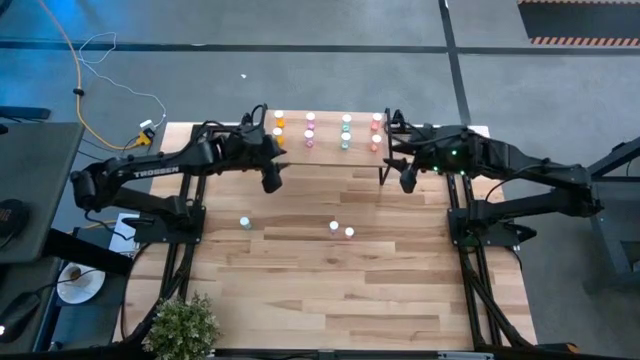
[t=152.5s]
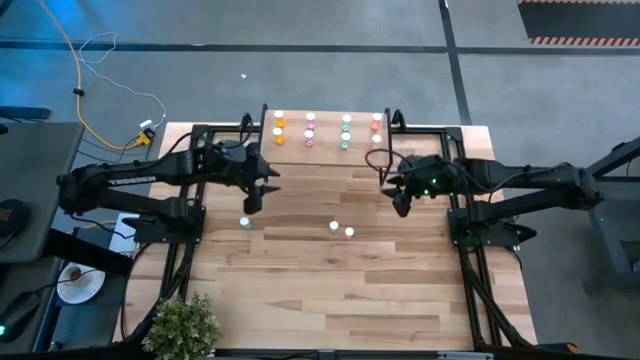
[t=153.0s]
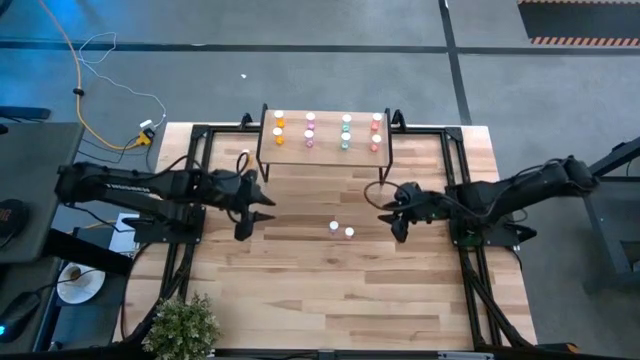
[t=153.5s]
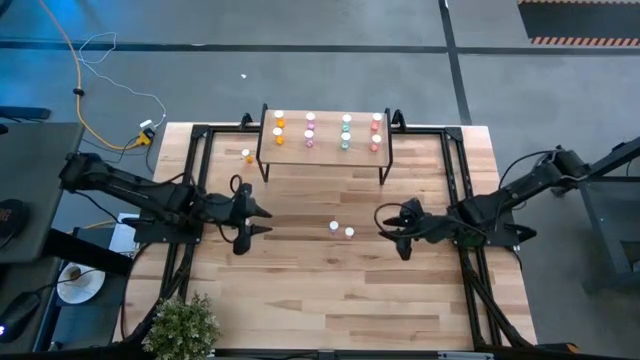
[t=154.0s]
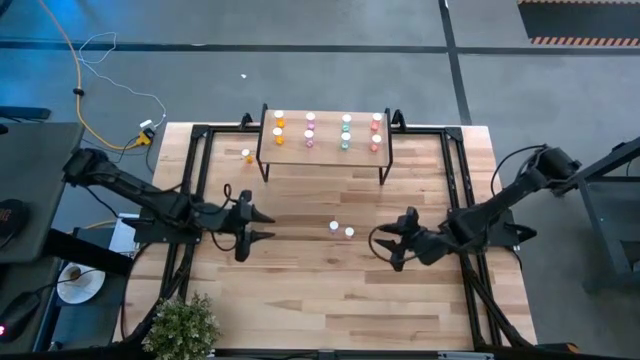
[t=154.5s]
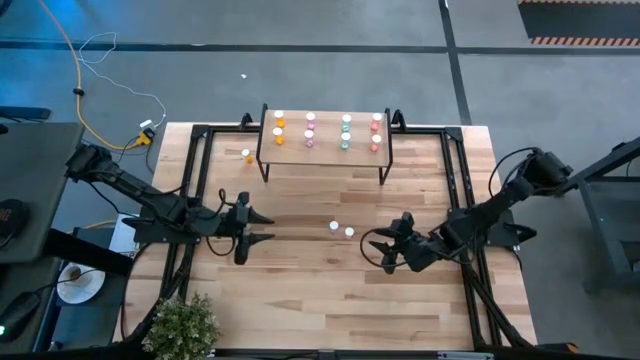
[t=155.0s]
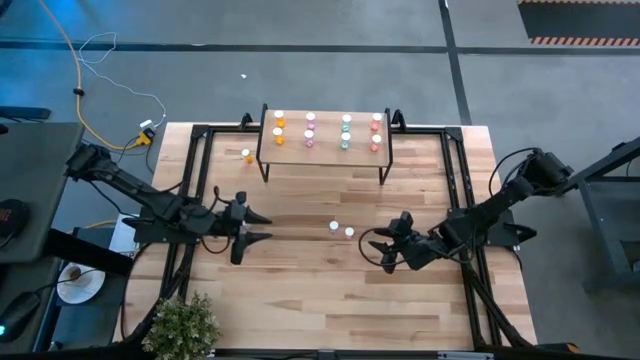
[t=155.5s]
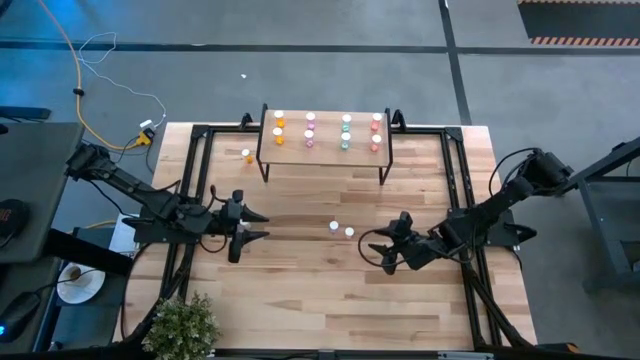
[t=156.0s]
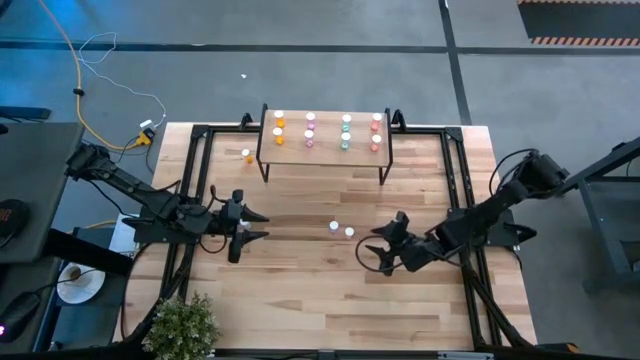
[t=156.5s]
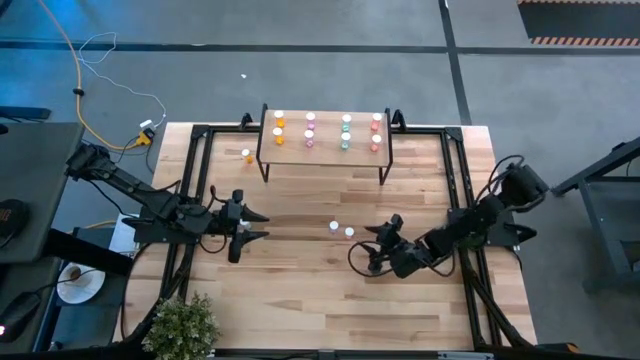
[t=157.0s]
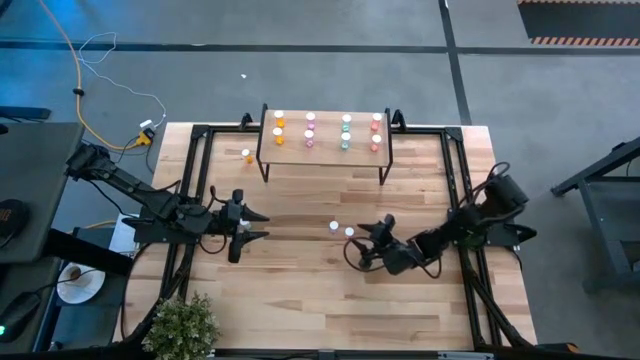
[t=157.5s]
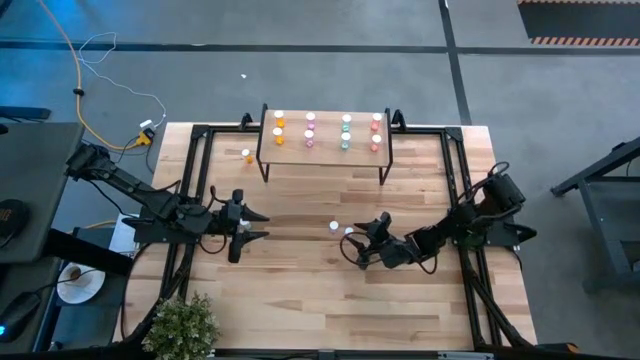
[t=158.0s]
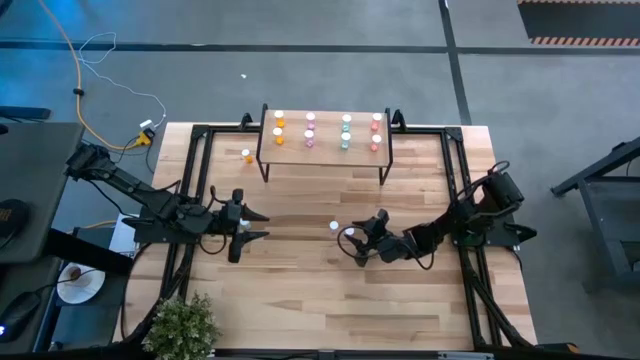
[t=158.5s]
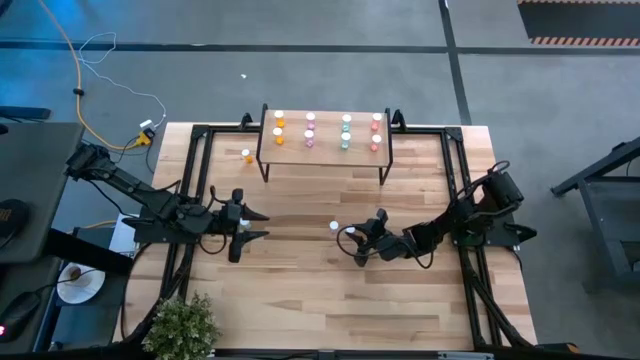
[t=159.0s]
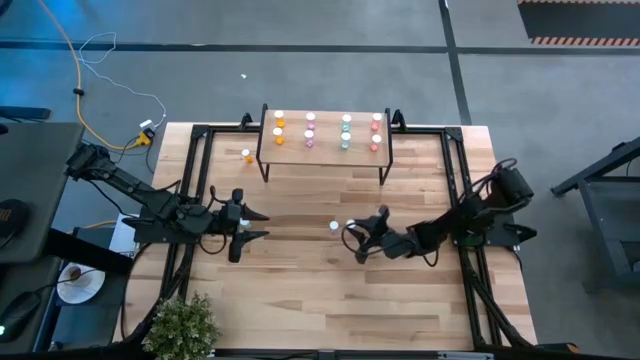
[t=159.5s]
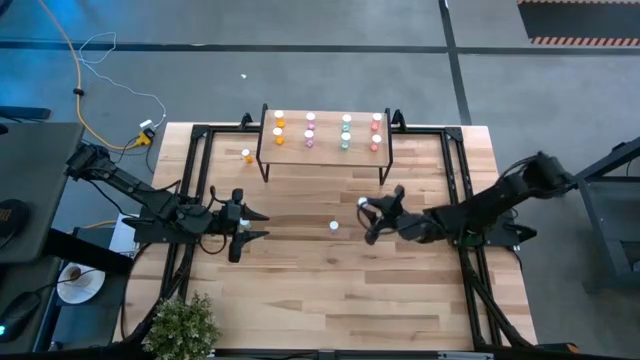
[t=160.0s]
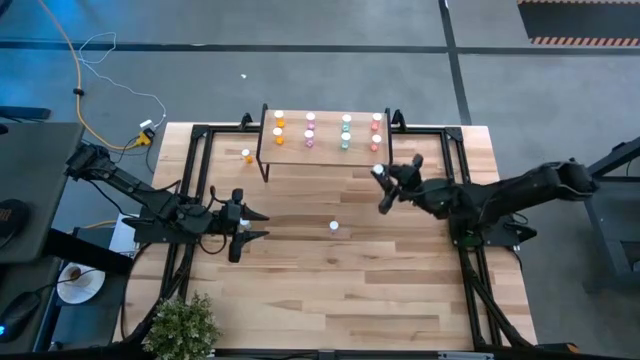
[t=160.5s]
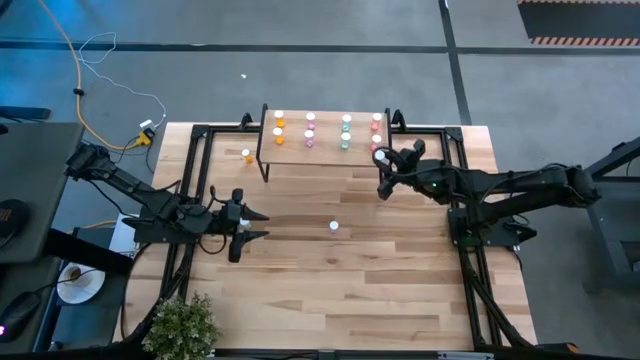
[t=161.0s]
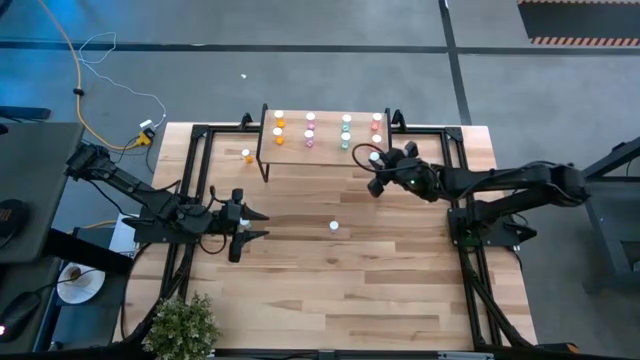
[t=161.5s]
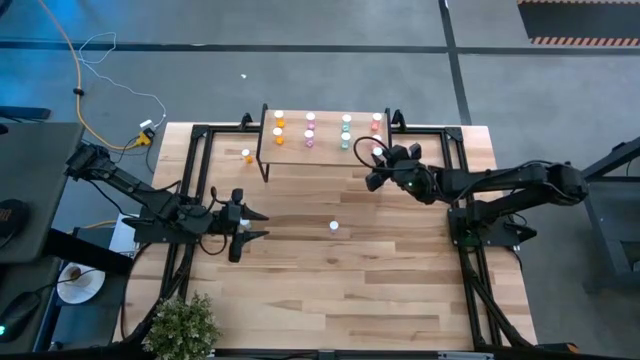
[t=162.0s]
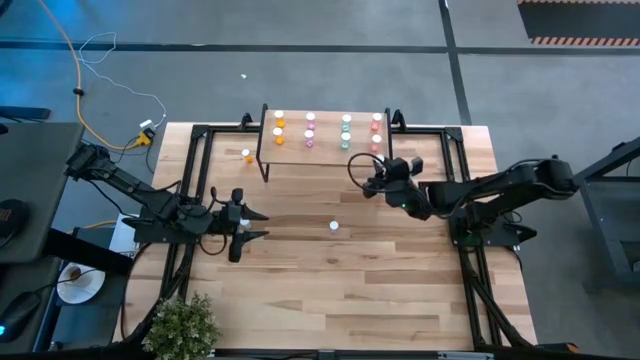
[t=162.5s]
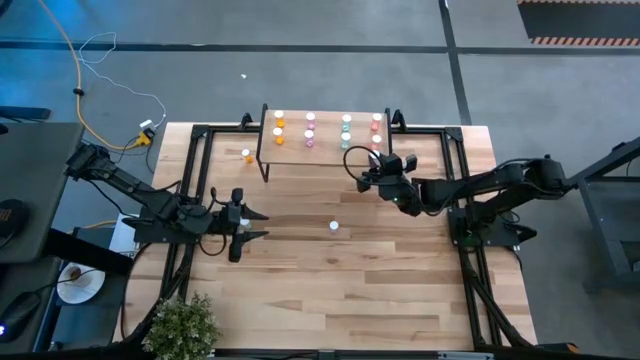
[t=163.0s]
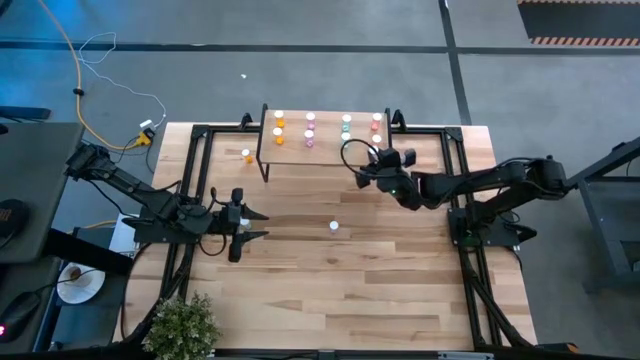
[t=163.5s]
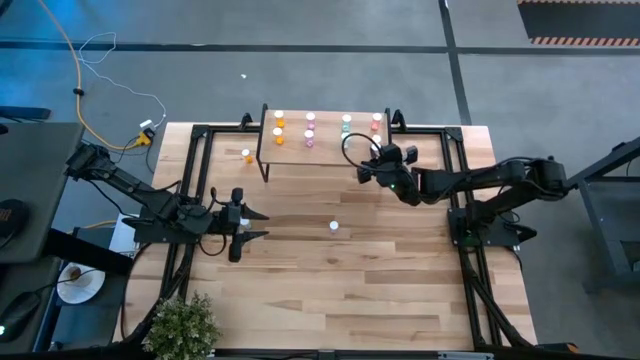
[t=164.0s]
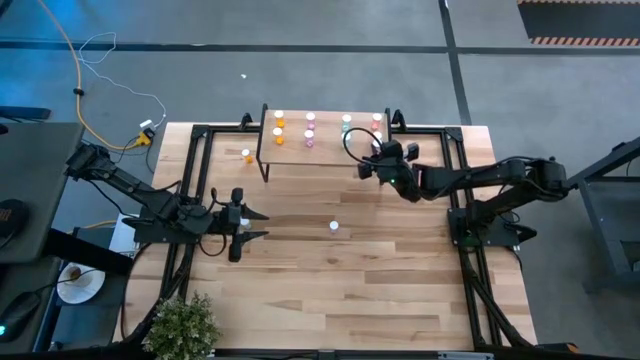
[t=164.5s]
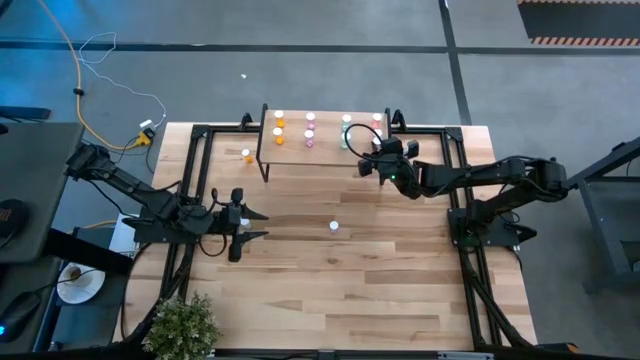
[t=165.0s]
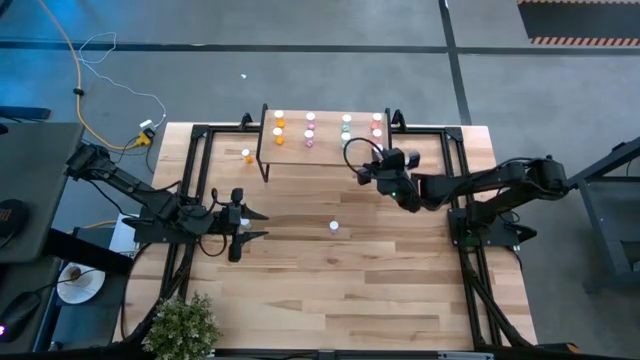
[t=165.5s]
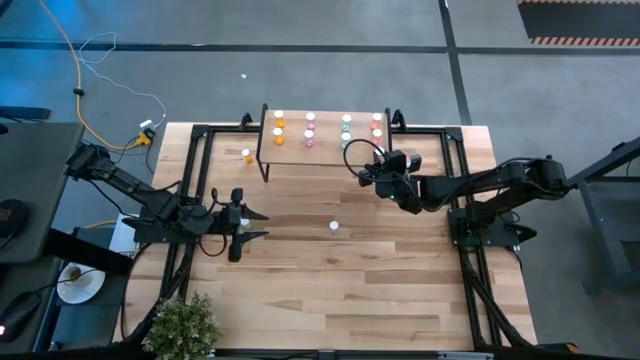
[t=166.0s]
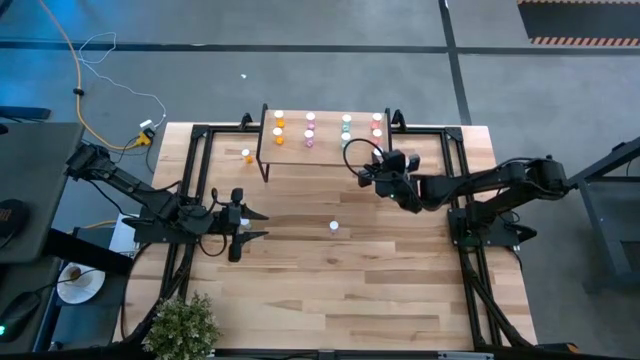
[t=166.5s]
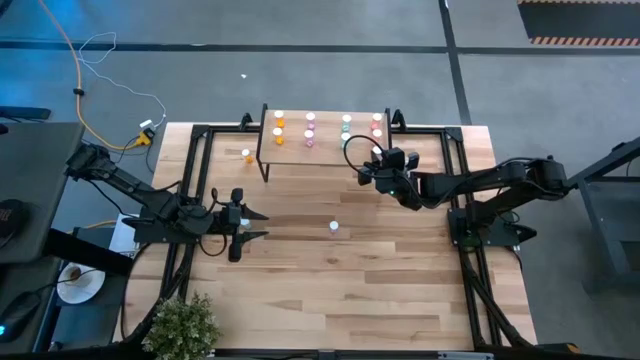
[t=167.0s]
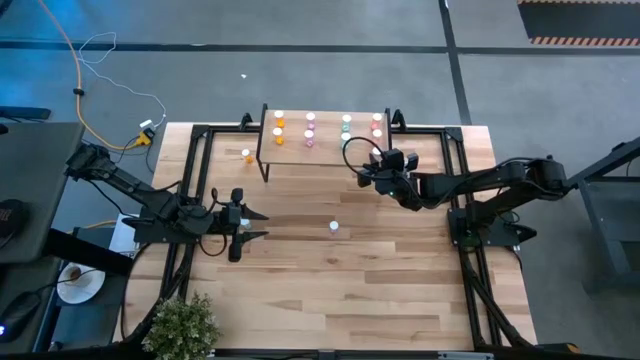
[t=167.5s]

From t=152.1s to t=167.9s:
Task: Pick and place medicine bottles onto shelf by color
Put the red pill bottle on the shelf aligned with the other red pill bottles

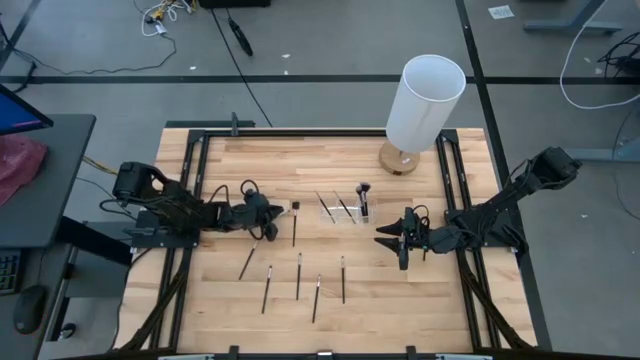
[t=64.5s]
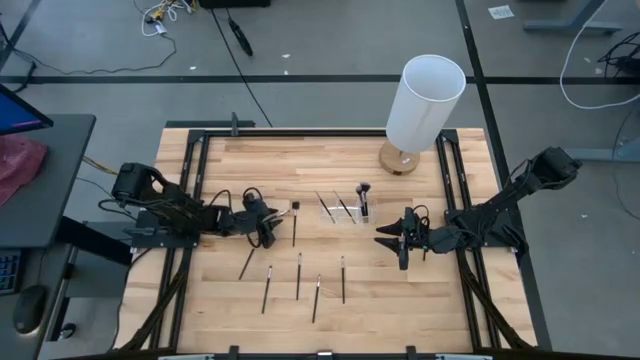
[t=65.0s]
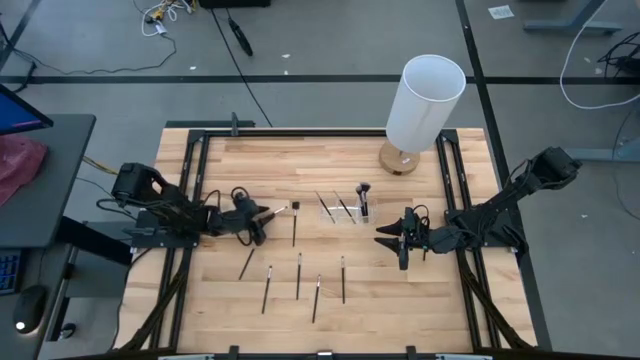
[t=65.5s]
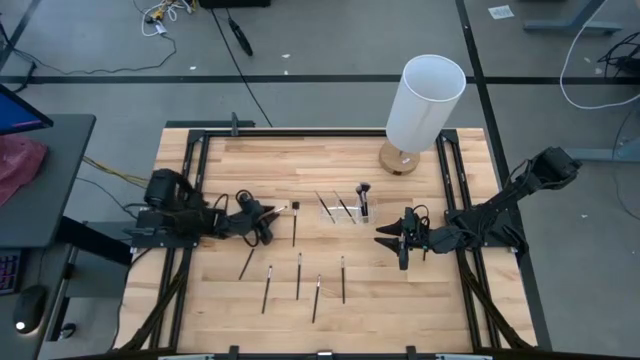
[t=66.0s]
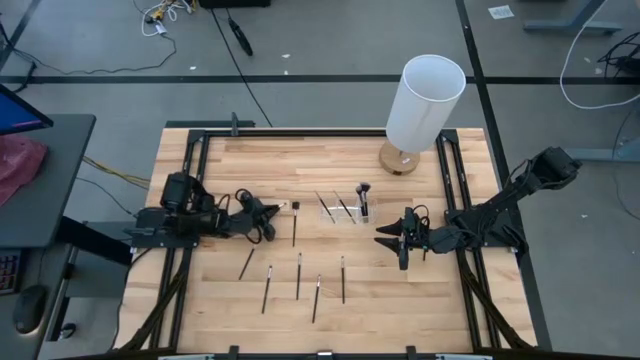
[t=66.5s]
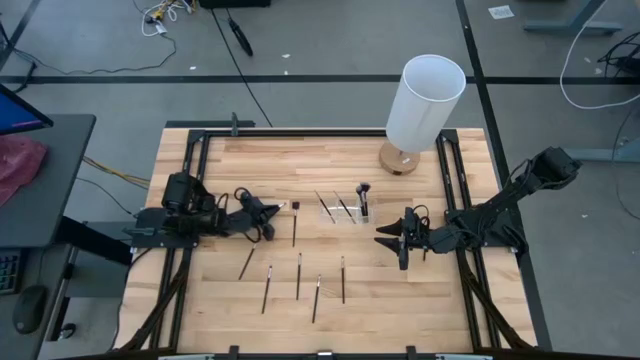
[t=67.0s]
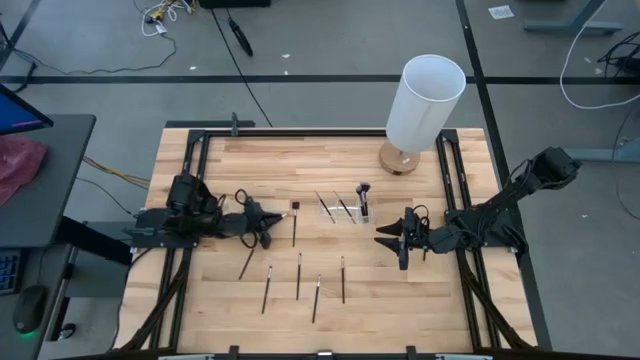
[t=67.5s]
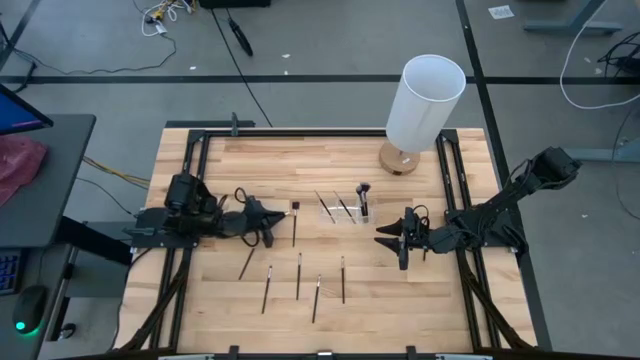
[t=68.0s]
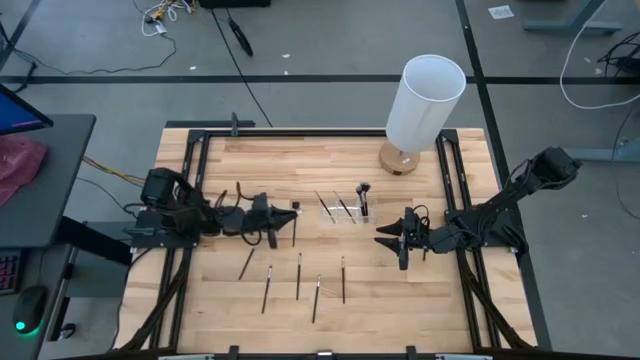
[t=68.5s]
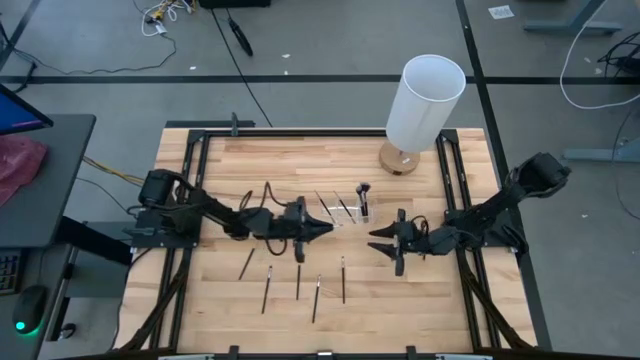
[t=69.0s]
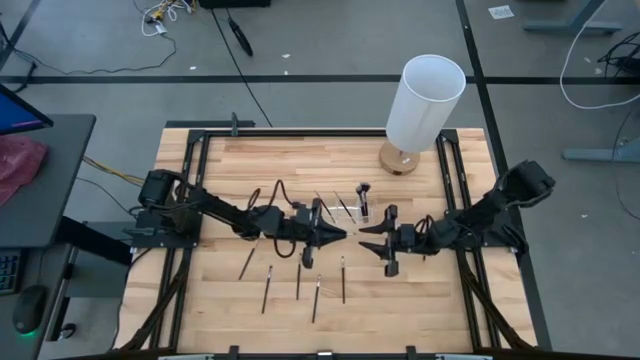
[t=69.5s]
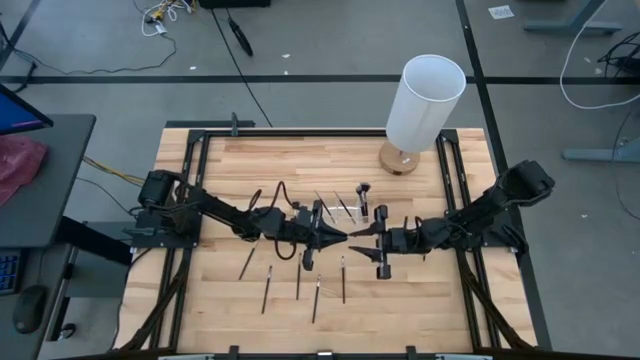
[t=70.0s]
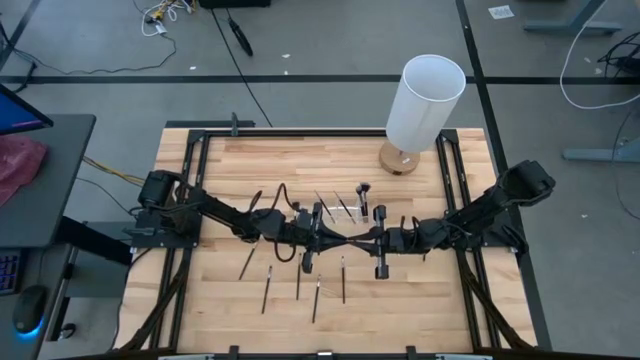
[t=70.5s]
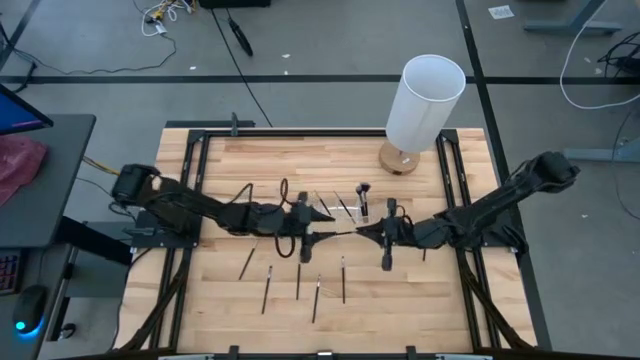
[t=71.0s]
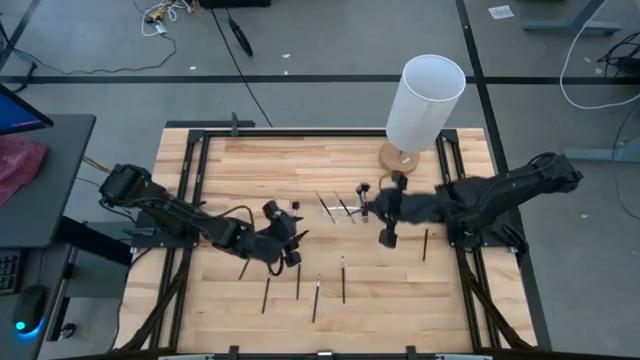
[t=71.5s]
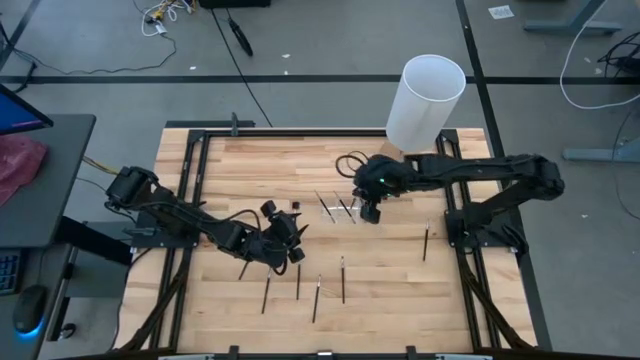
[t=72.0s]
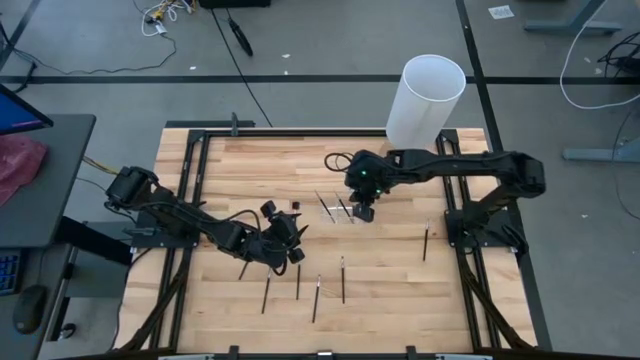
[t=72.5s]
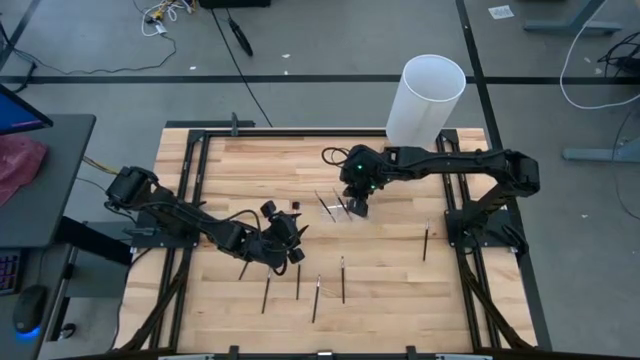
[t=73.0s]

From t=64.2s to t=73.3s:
Task: Pick & Place Makeup Supplies
Put the black makeup brush into the transparent organizer
